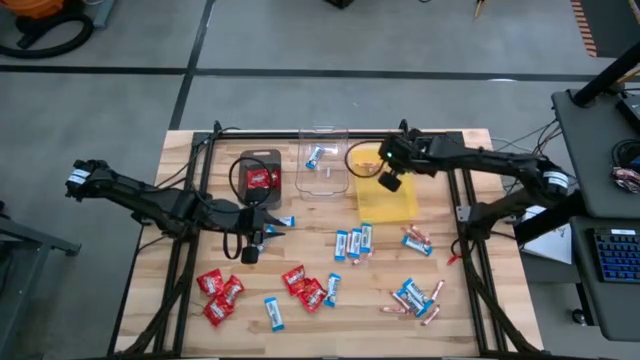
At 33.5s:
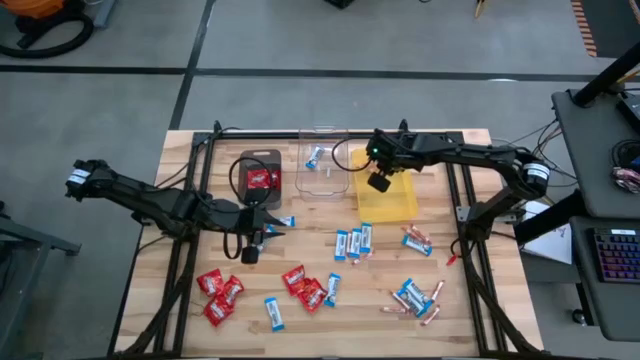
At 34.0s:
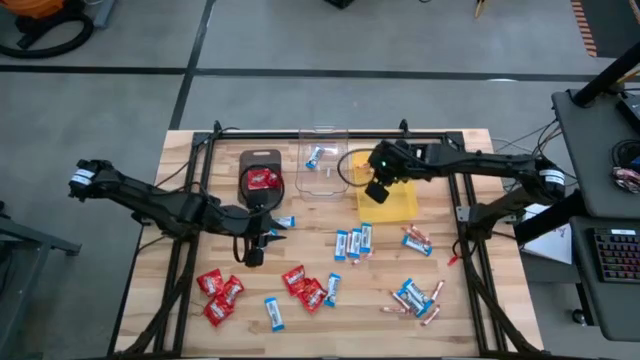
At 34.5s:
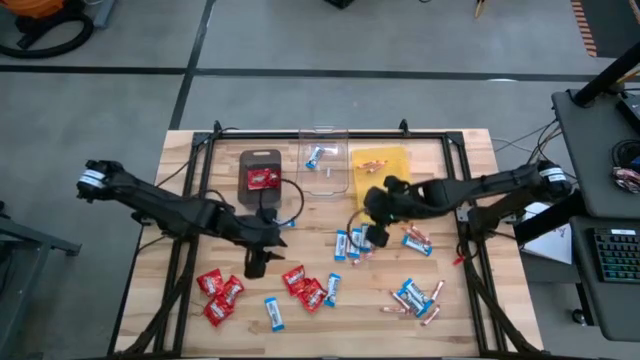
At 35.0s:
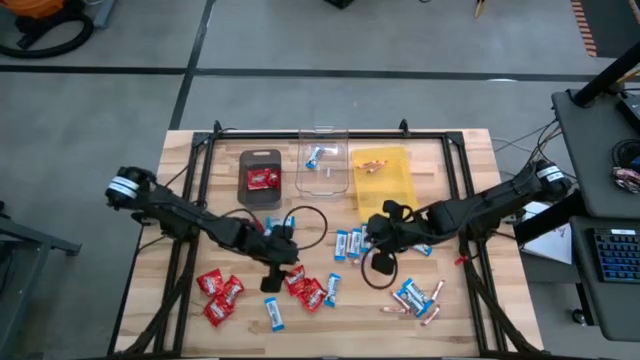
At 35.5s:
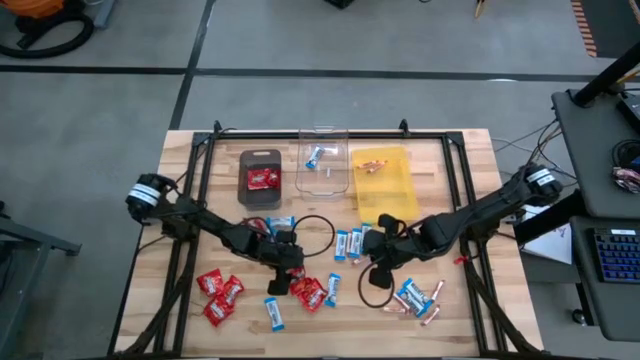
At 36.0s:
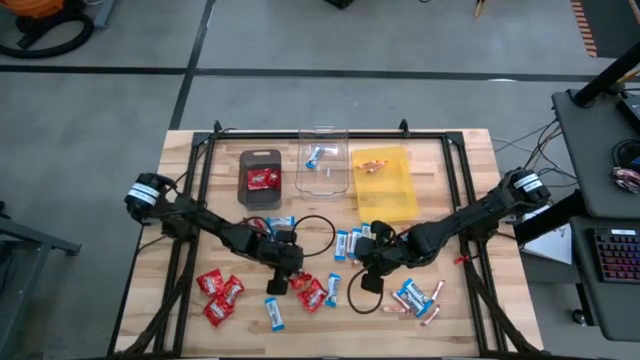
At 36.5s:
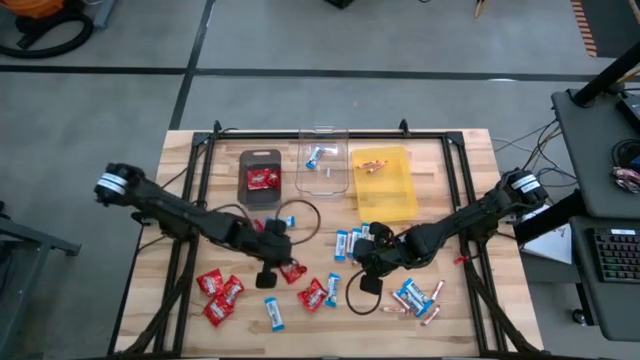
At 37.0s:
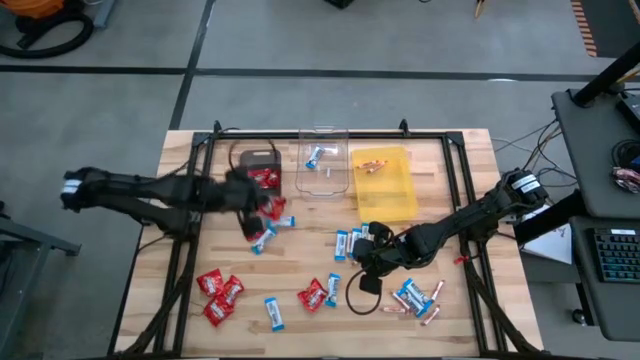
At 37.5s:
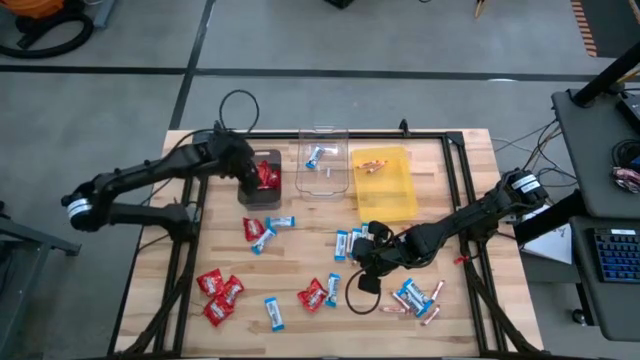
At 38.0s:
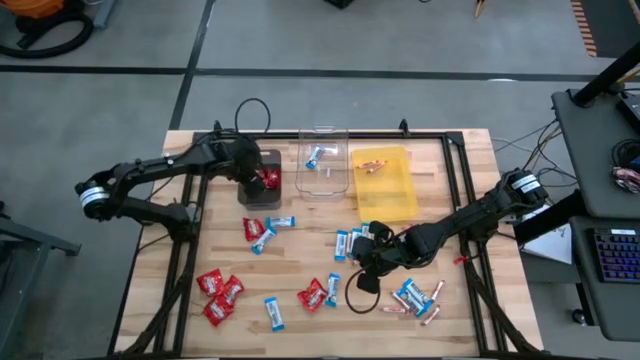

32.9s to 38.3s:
Task: Sort candy
Put the red candy into the black bin

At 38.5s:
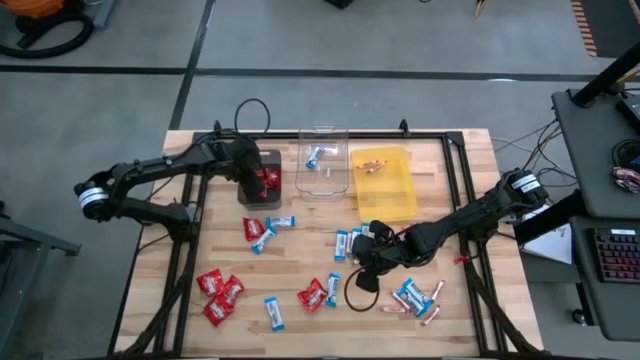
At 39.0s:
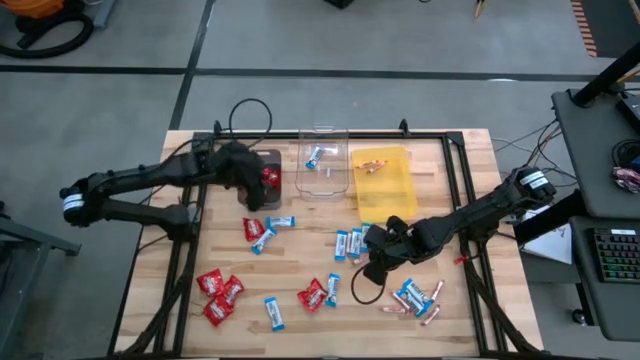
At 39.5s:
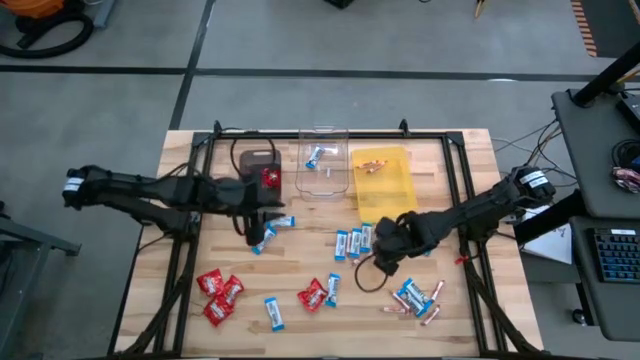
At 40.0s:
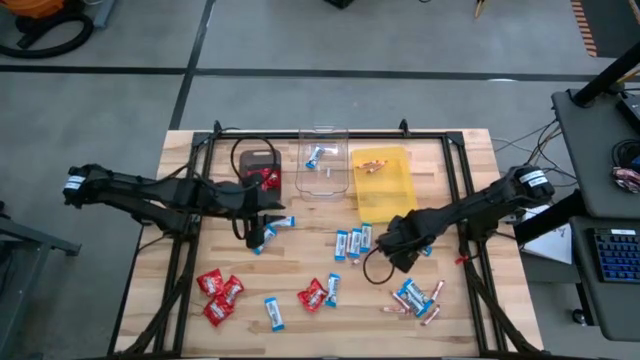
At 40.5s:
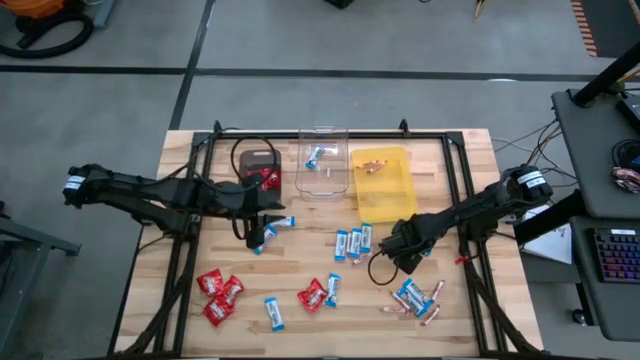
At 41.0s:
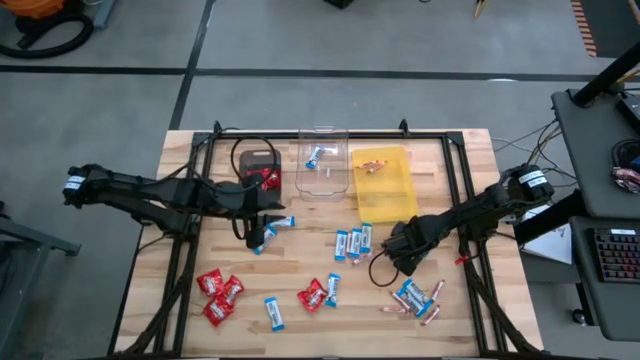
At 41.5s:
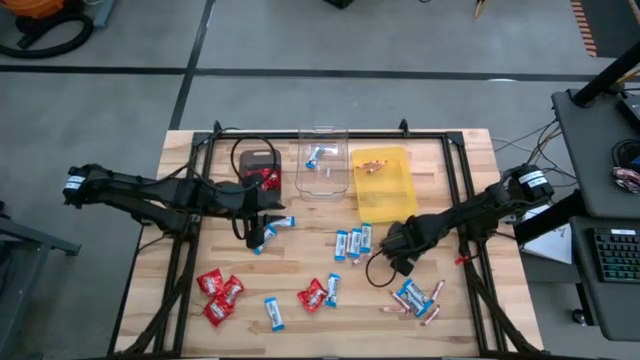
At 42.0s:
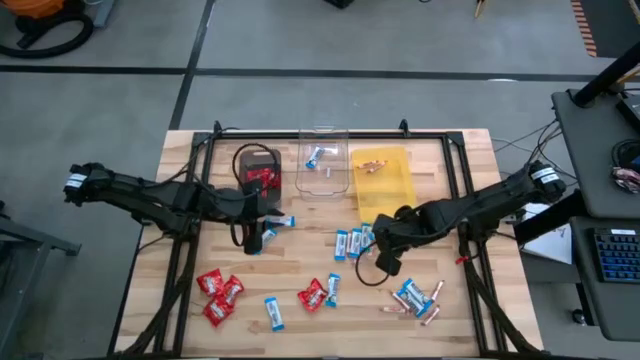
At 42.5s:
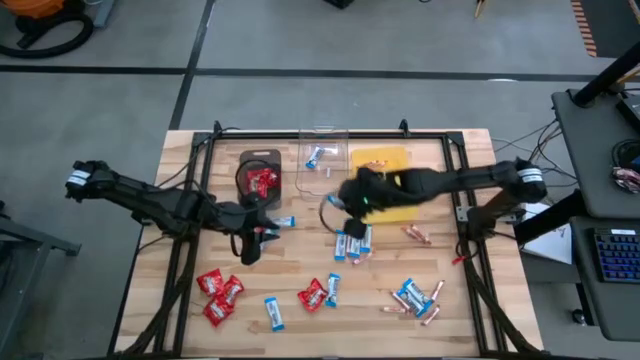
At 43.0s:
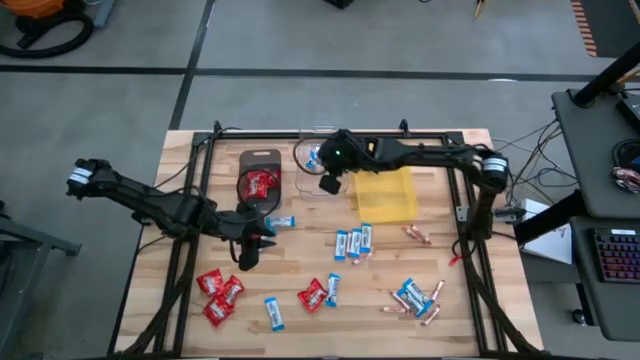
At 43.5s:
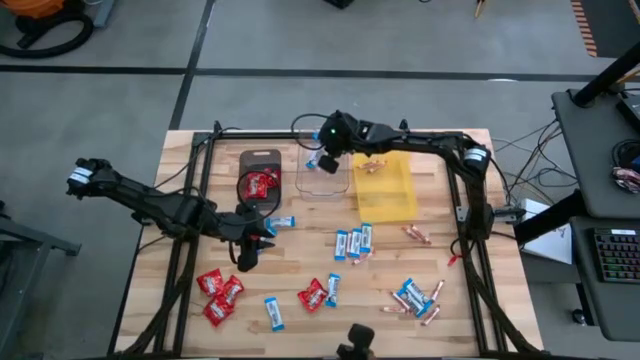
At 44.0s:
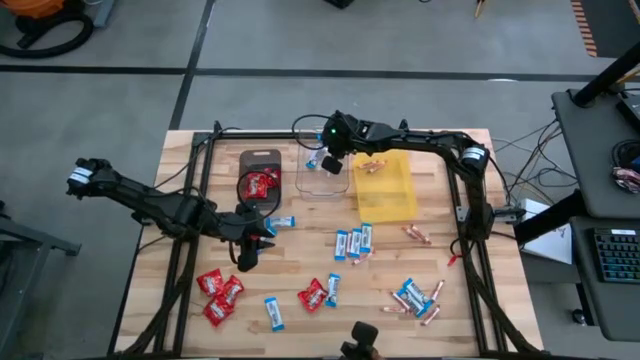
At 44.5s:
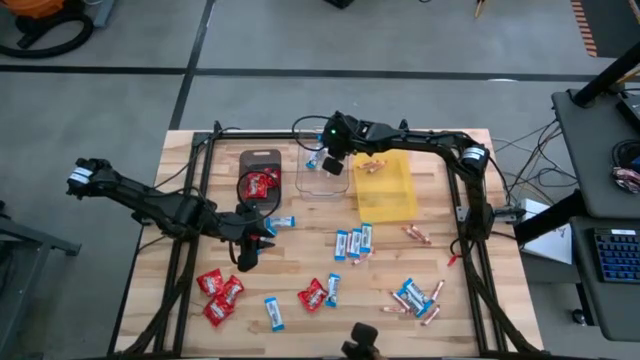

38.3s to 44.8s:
Put the white chocolate into the transparent bin

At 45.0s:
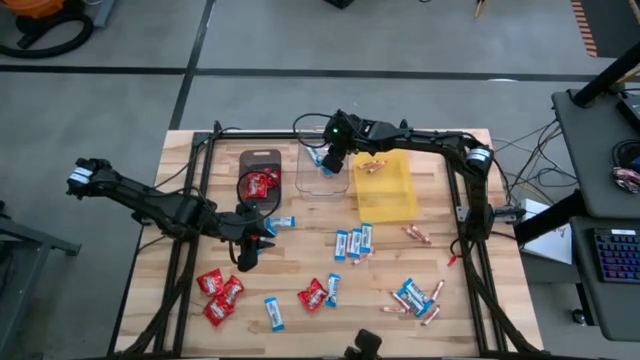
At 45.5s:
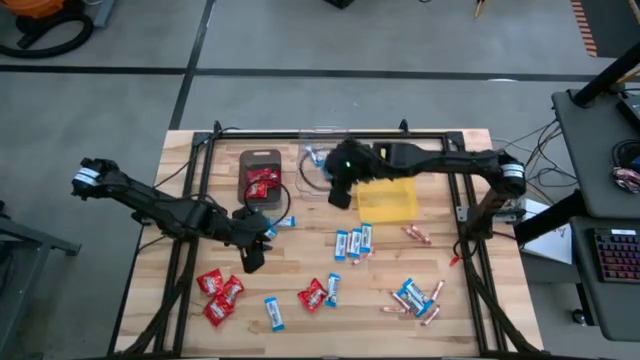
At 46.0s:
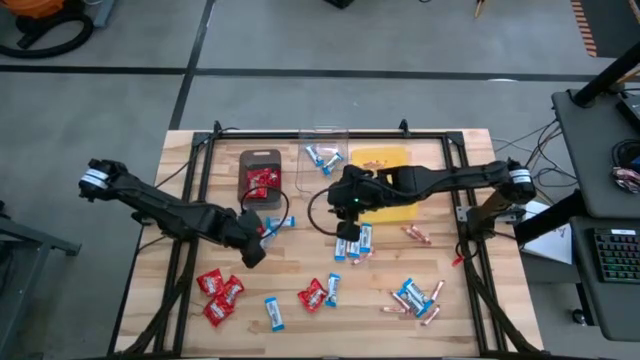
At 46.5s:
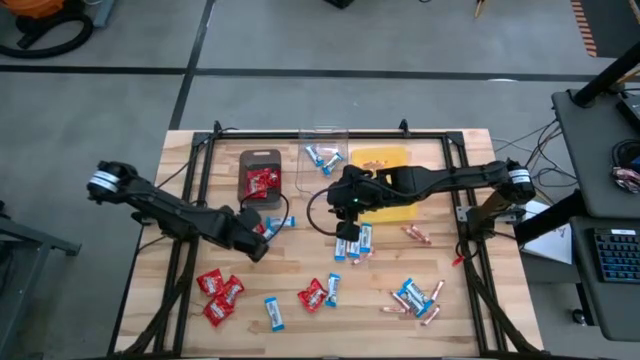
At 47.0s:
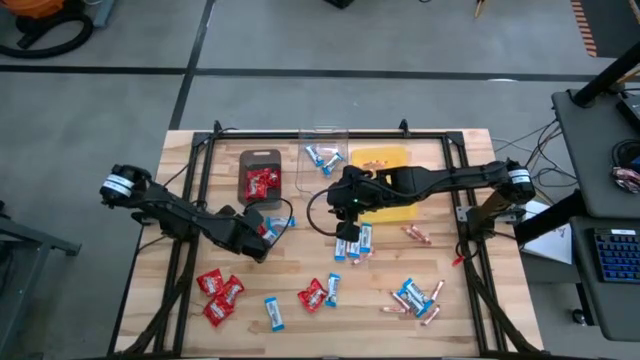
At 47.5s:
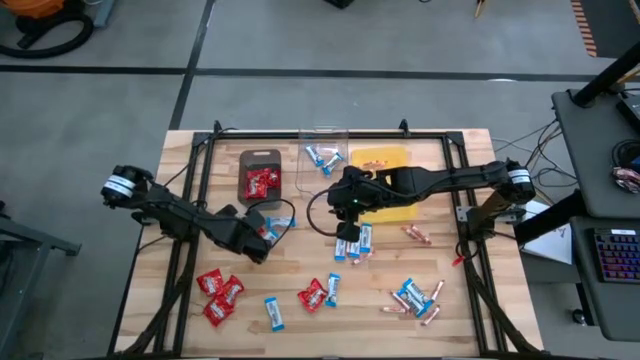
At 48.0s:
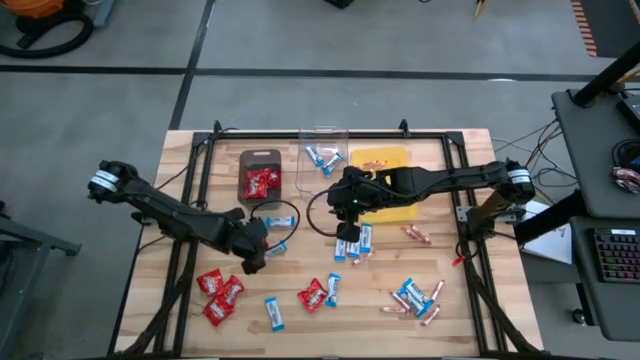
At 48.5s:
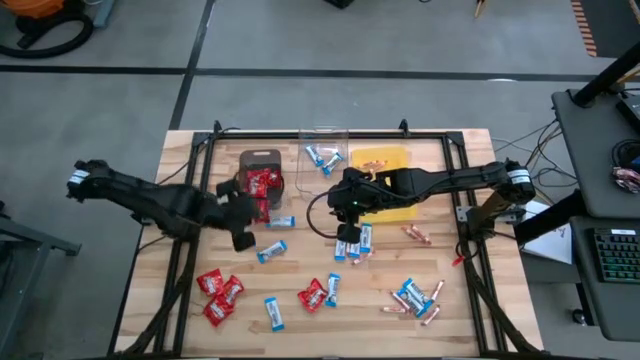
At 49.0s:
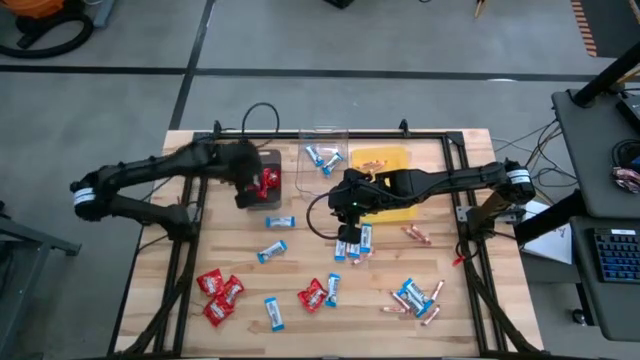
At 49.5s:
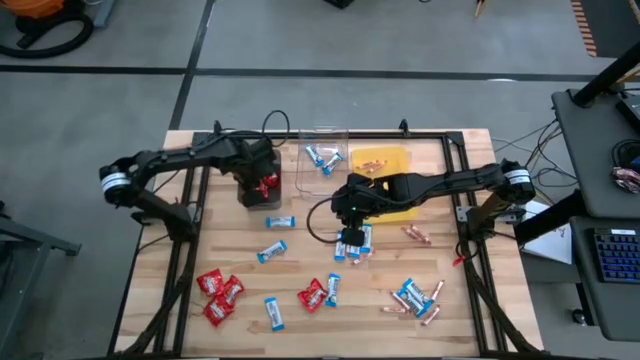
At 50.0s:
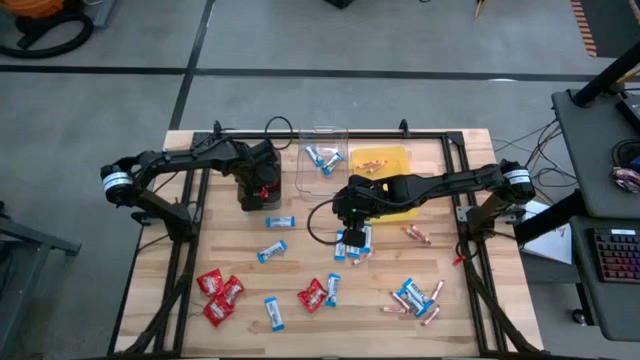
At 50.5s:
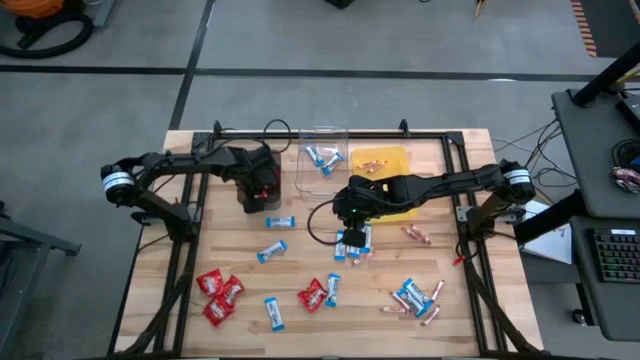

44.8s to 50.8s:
Put the red candy into the black bin
